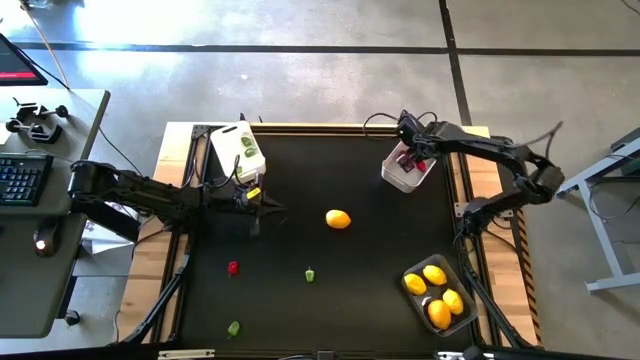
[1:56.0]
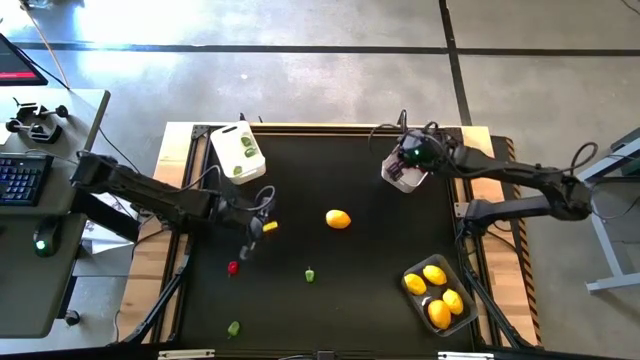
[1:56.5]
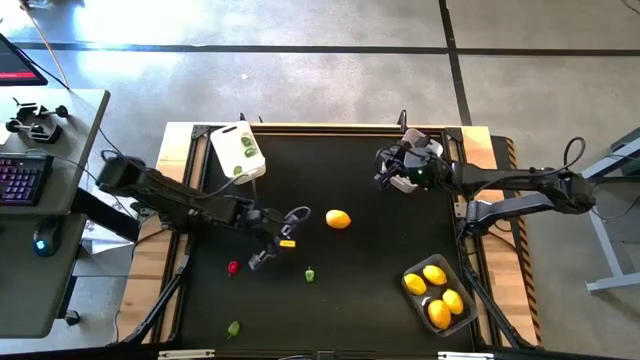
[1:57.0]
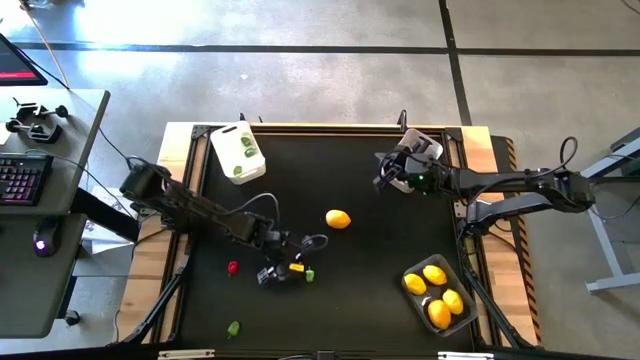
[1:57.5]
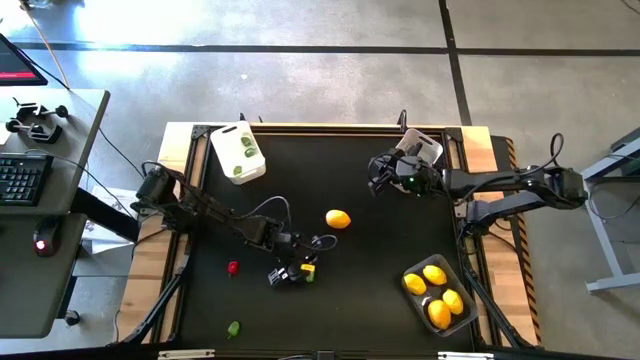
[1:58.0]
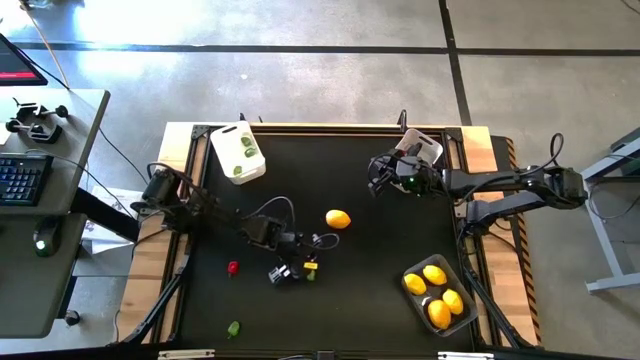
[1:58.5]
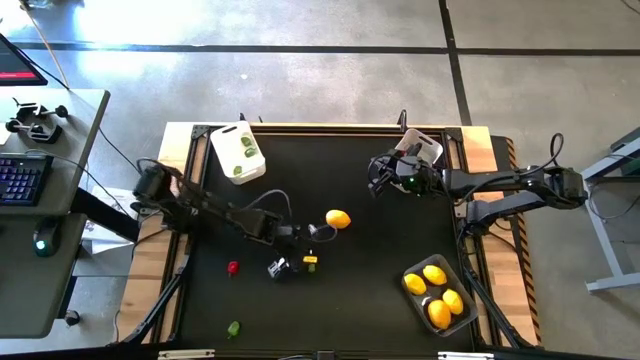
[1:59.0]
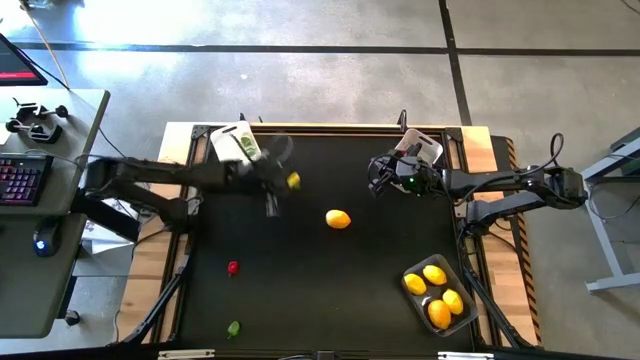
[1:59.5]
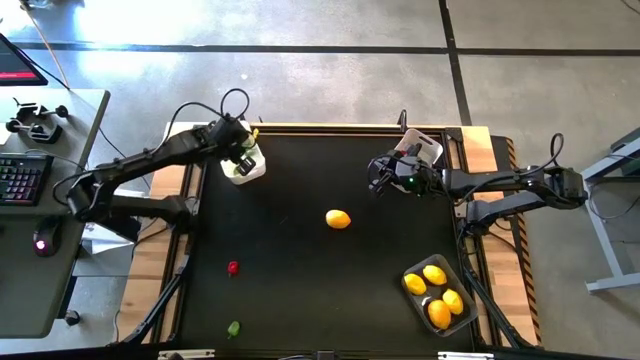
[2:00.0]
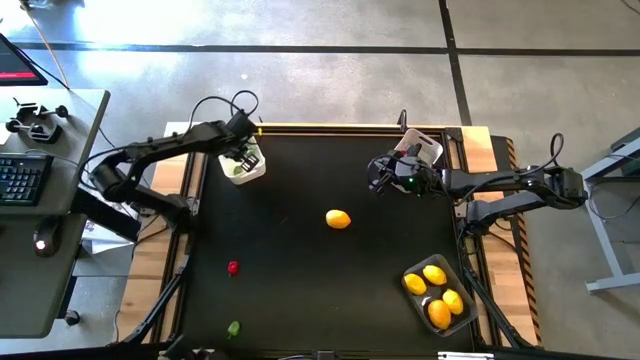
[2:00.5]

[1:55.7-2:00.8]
Task: Sort produce into baskets
Put the green chili pepper into the white bin

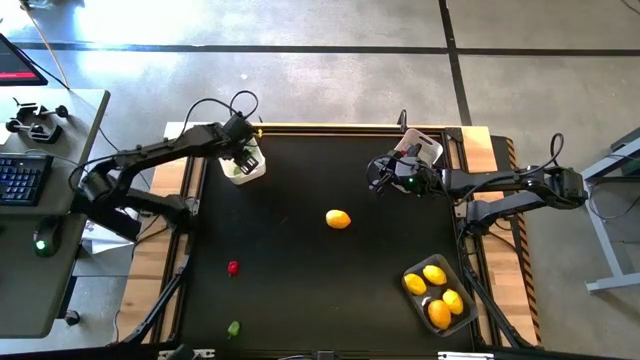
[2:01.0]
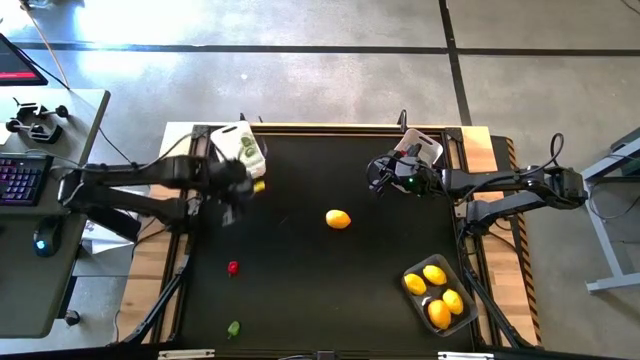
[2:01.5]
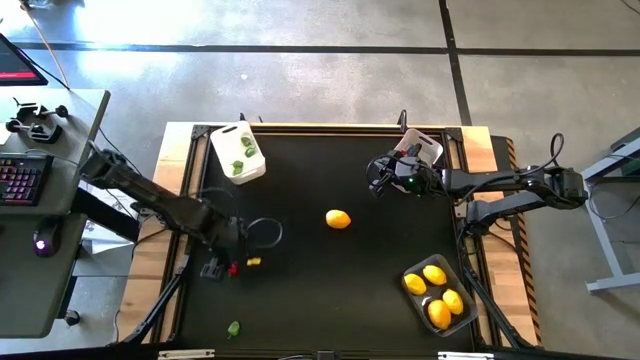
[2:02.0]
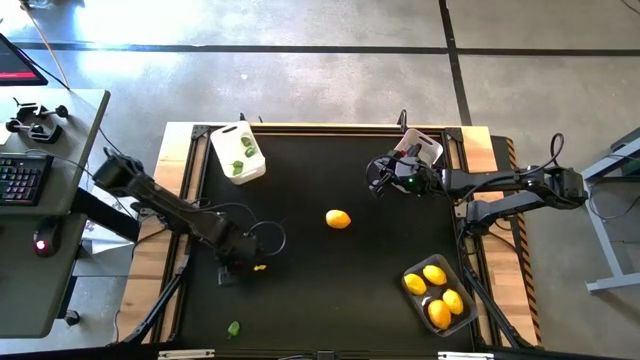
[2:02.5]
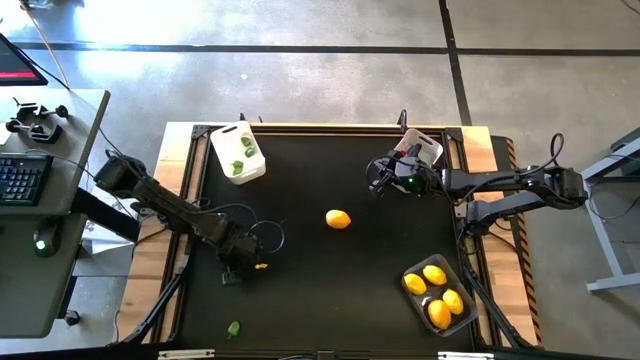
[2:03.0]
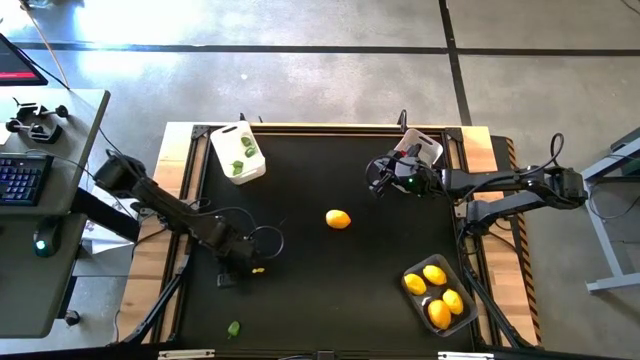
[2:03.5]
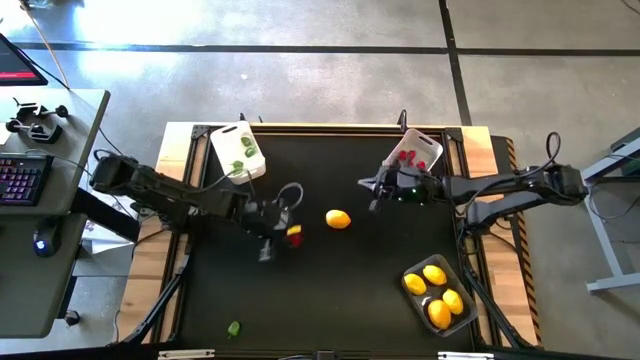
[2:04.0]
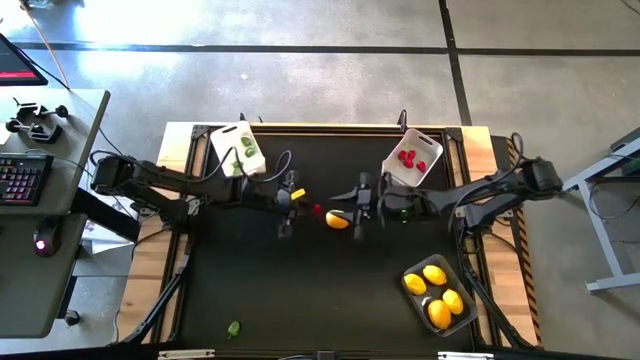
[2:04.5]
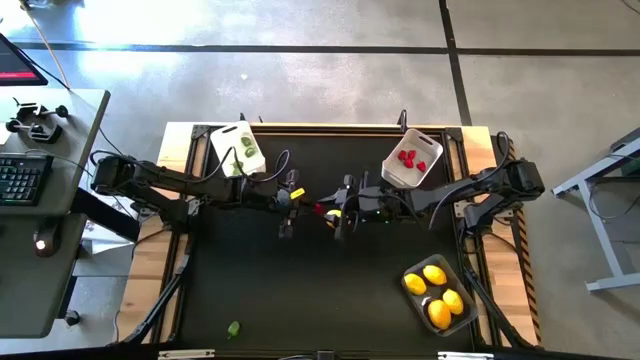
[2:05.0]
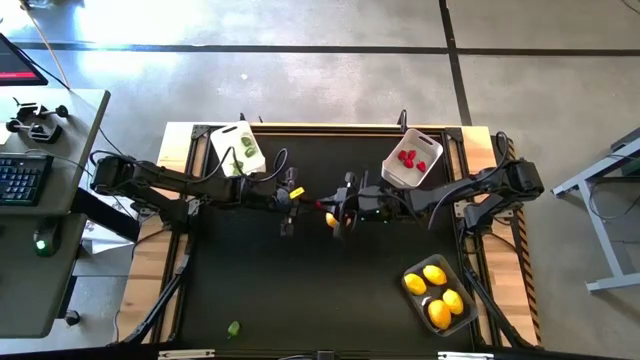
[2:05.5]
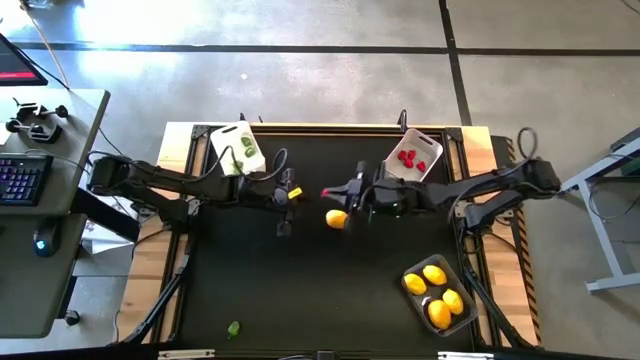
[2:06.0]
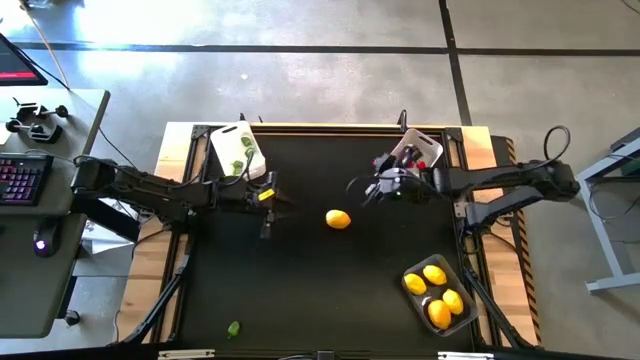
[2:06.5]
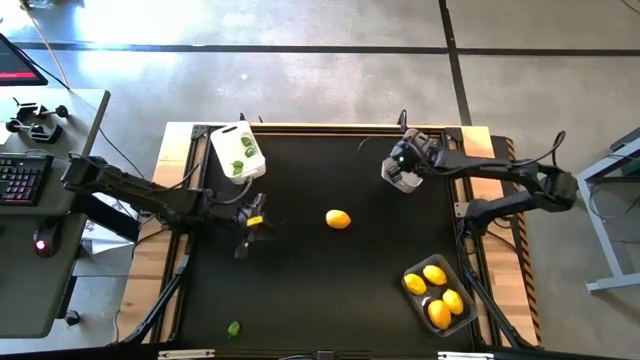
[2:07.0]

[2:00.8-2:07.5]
Put the red chili pepper into the gray bin

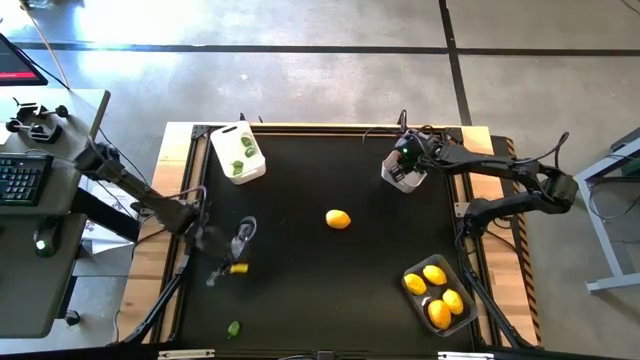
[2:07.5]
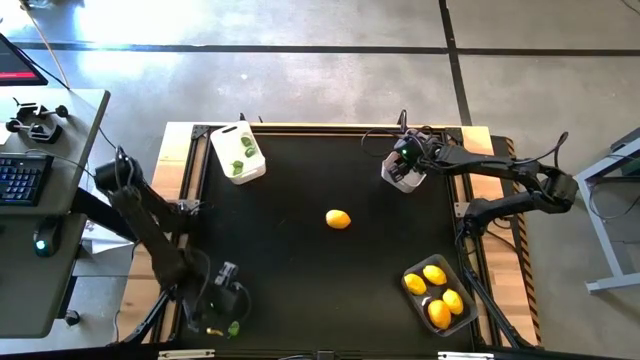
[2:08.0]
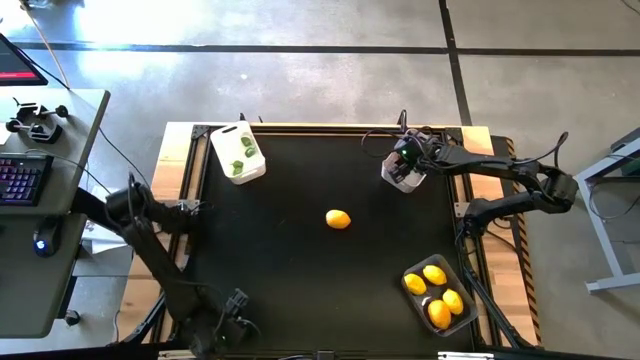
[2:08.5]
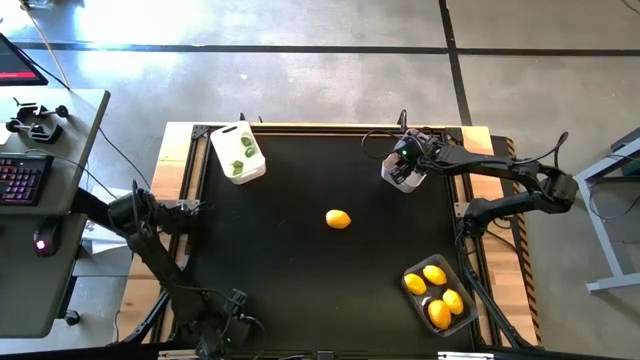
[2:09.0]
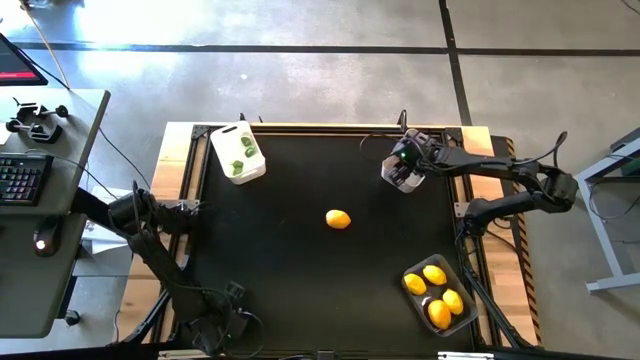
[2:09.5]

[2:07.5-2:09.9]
Put the green chili pepper into the white bin

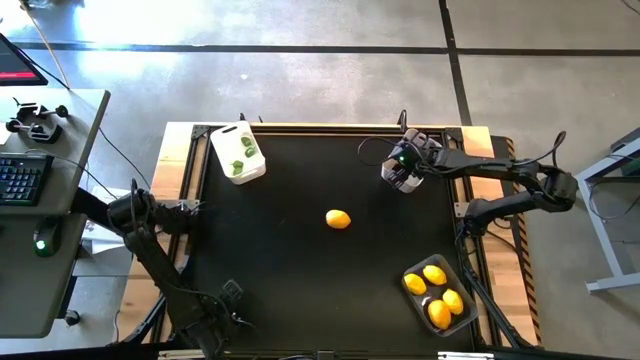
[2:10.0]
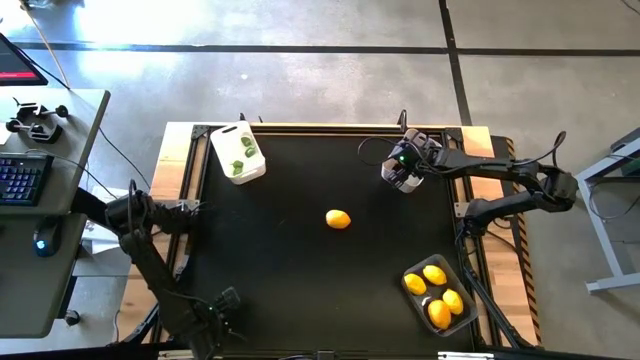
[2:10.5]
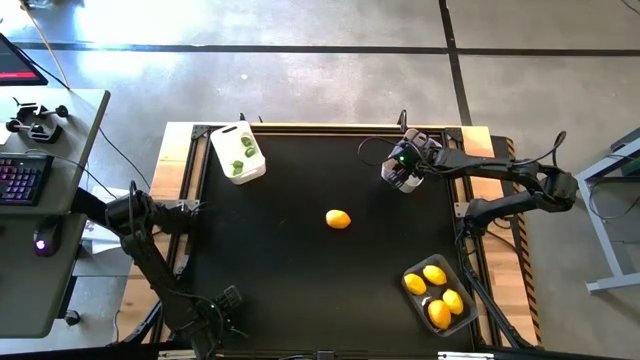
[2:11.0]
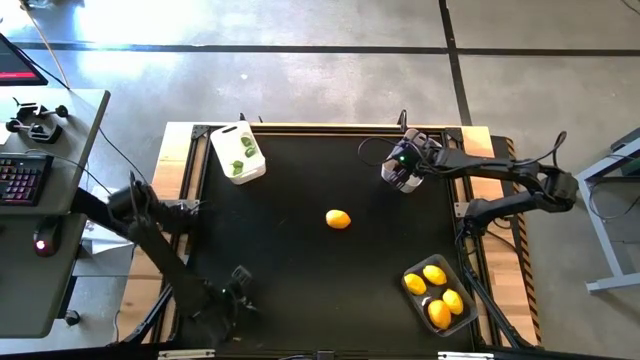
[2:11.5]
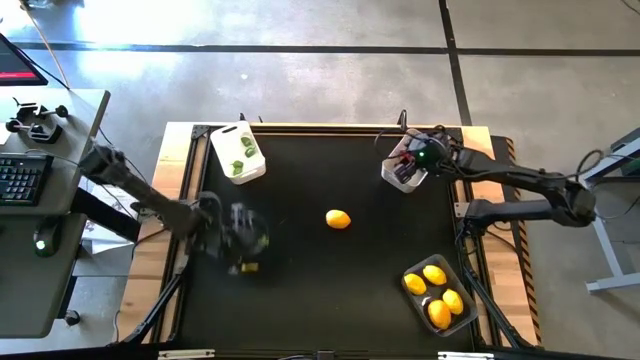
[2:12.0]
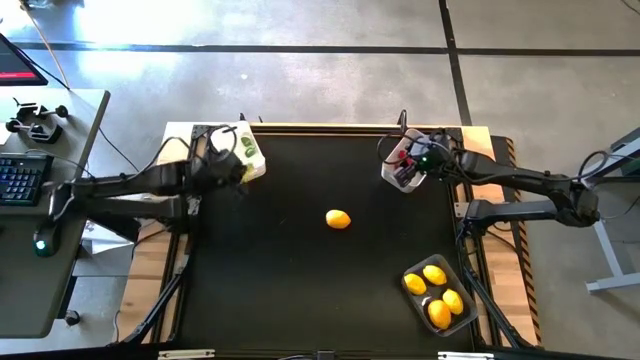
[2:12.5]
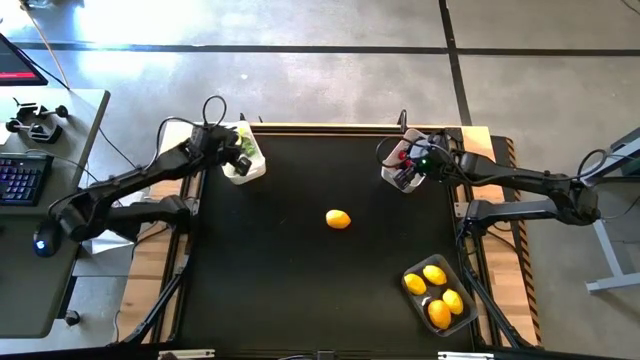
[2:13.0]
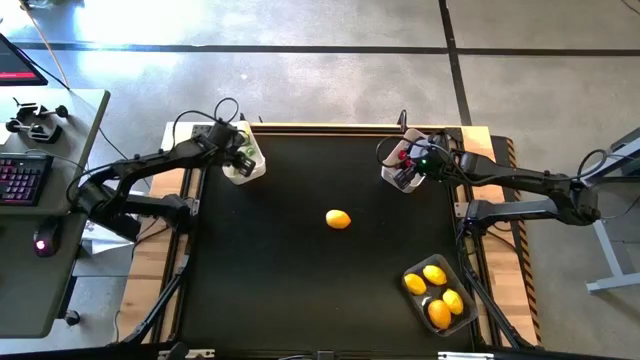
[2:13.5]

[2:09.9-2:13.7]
Put the green chili pepper into the white bin

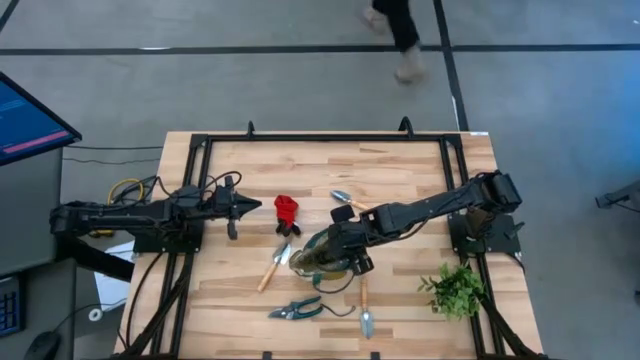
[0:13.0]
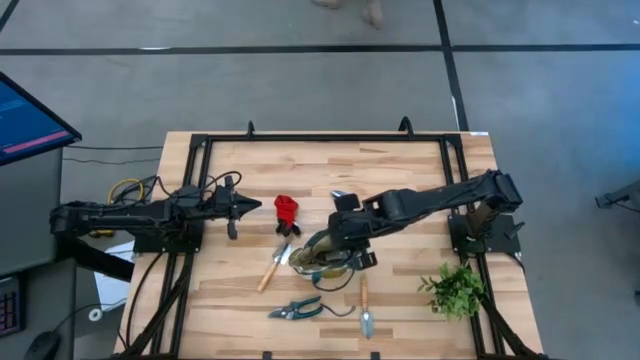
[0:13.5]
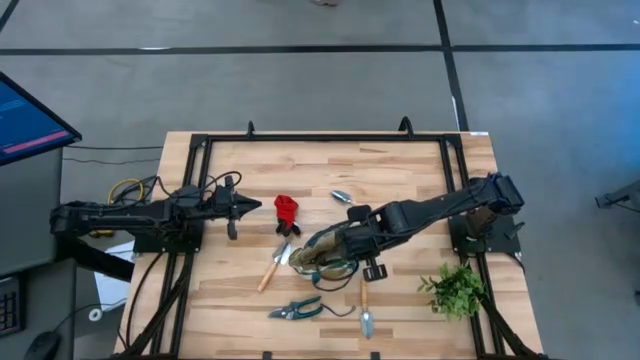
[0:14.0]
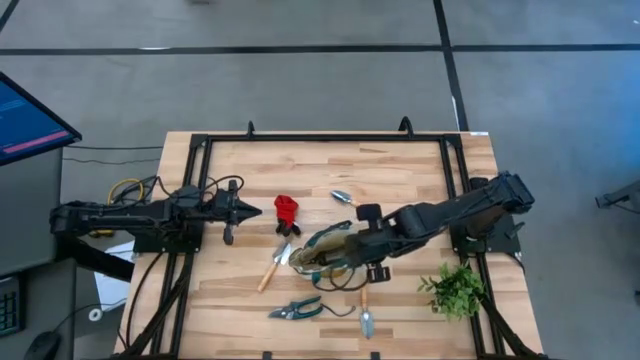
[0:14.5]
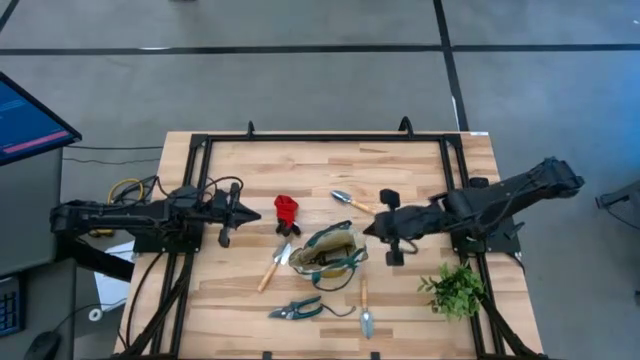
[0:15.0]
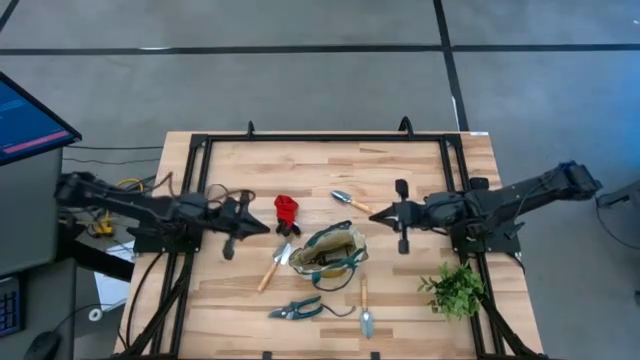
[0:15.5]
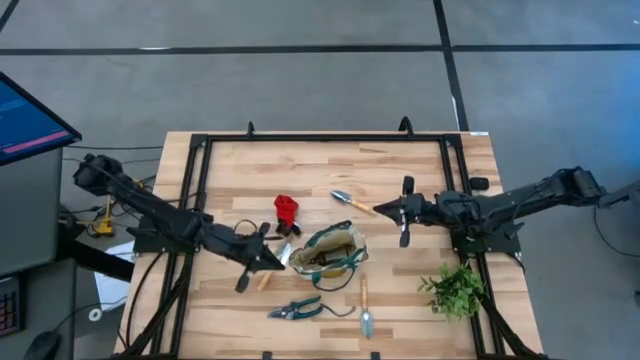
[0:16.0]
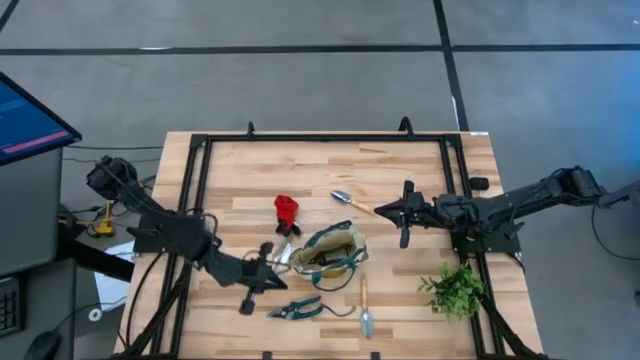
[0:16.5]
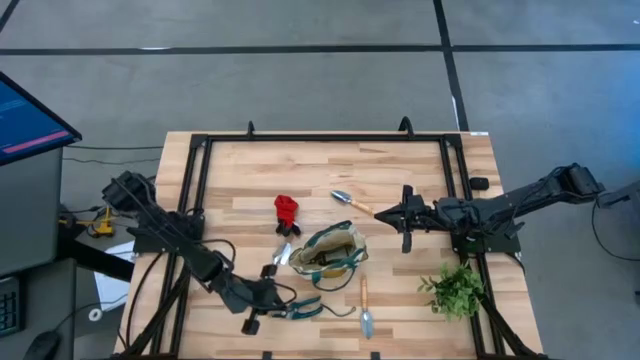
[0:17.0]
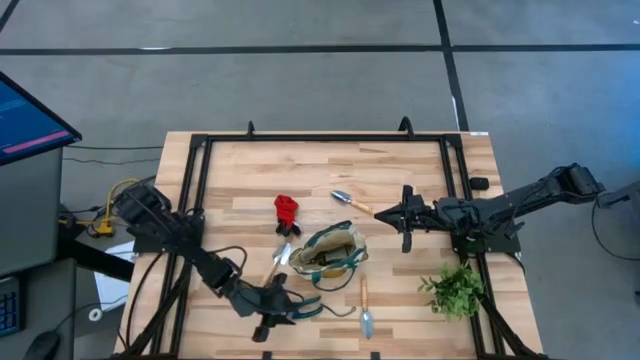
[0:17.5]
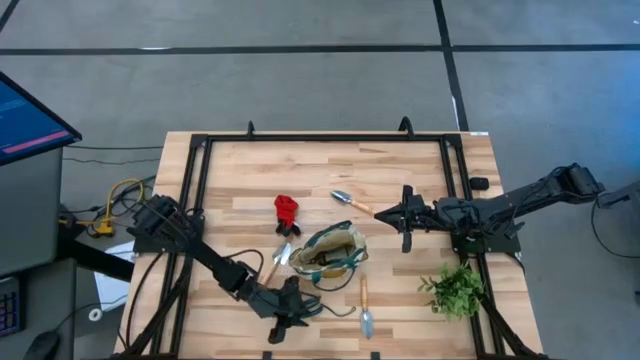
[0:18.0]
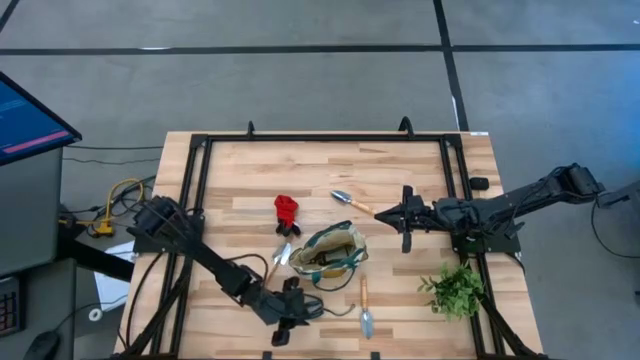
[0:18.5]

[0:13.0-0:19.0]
Task: Pick & Place Garden tools in Gardening bag
Put the shear scissors into the gardening bag
